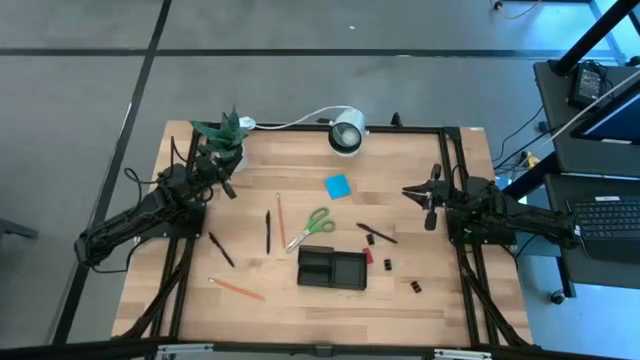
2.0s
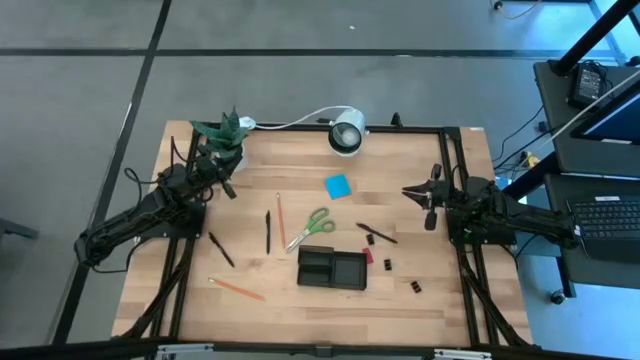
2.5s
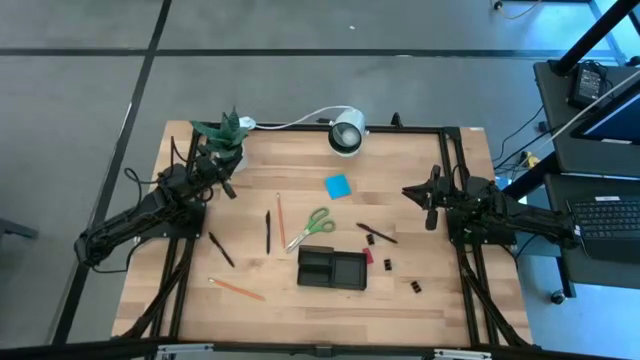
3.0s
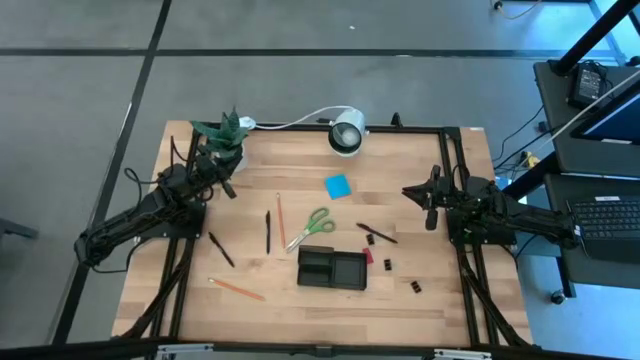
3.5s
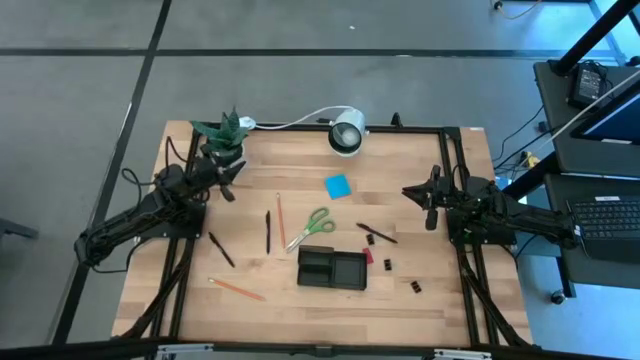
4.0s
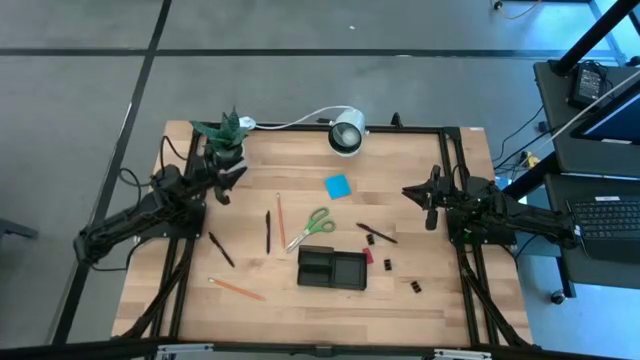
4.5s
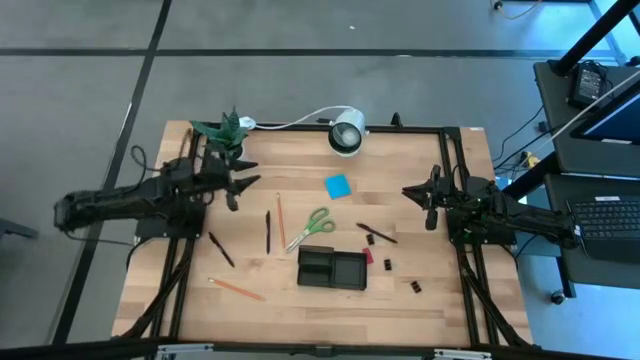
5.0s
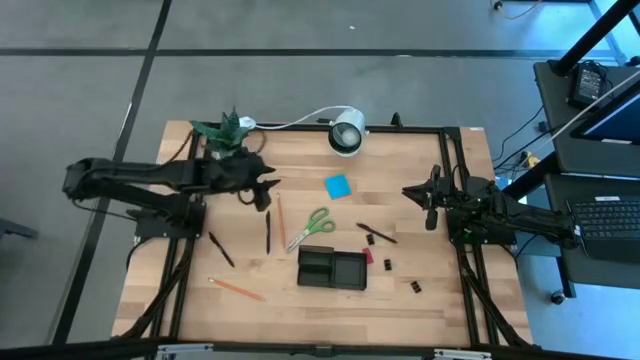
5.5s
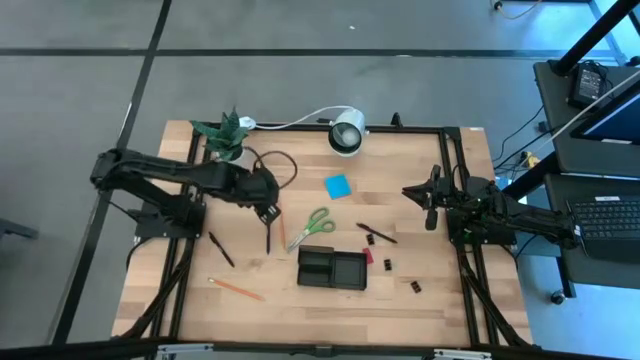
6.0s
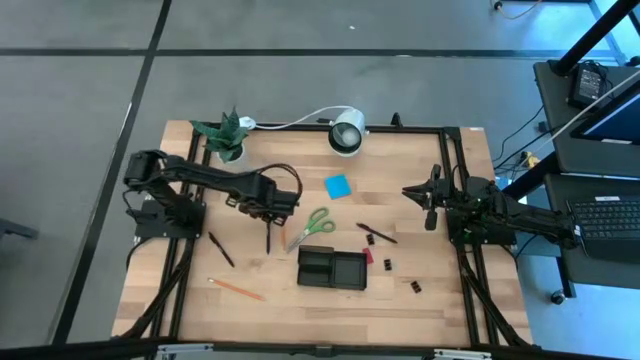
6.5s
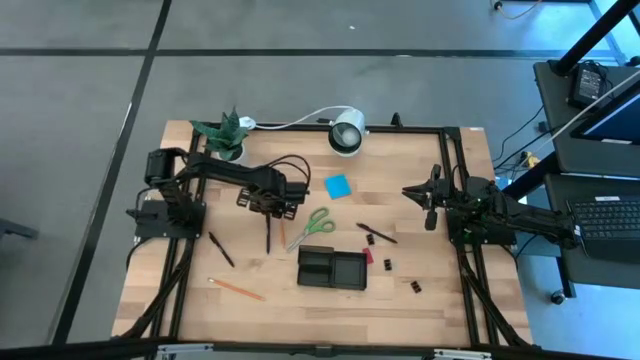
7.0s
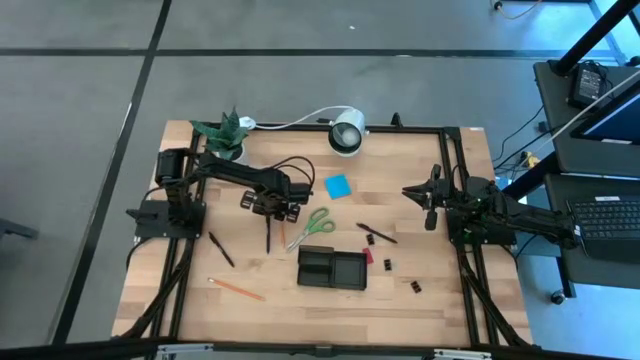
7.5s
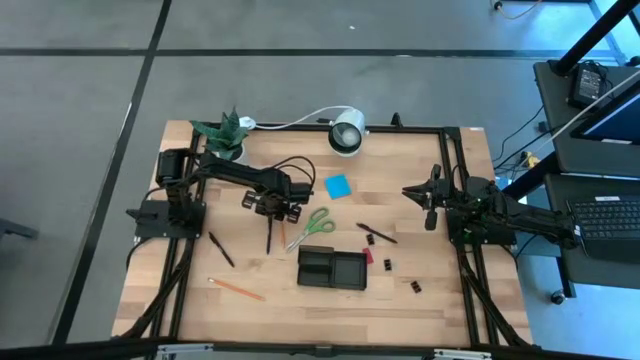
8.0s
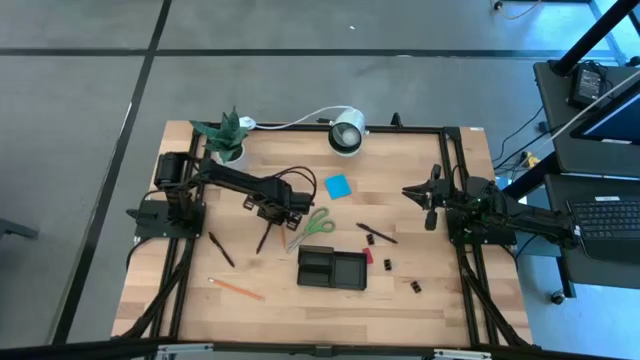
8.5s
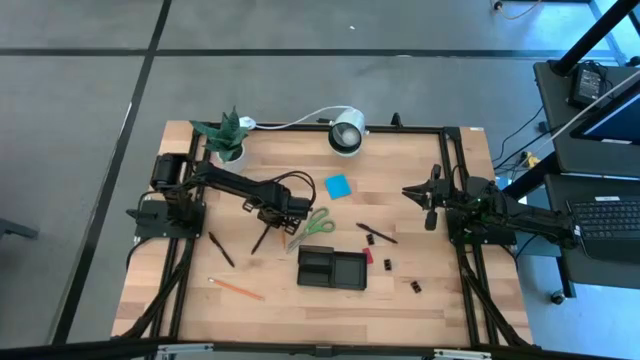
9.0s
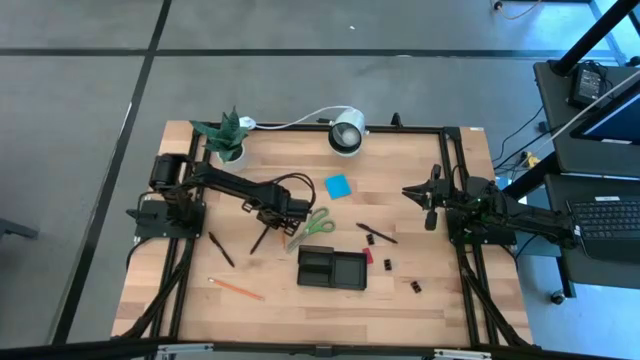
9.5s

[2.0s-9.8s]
Task: Pick and place office supplies into organizer
Put the middle black pen into the desk organizer

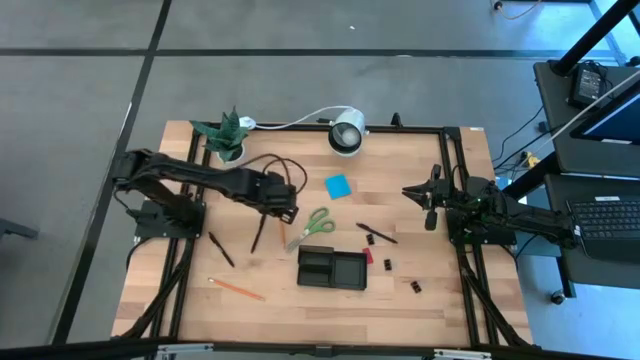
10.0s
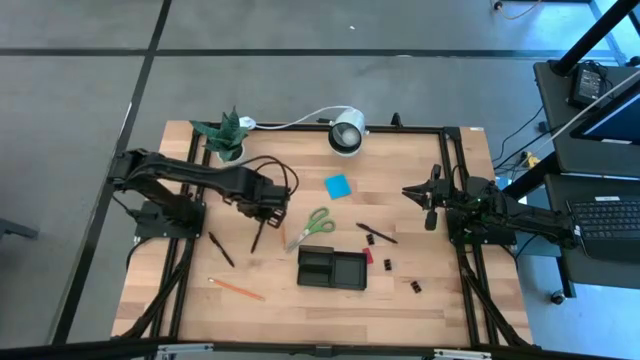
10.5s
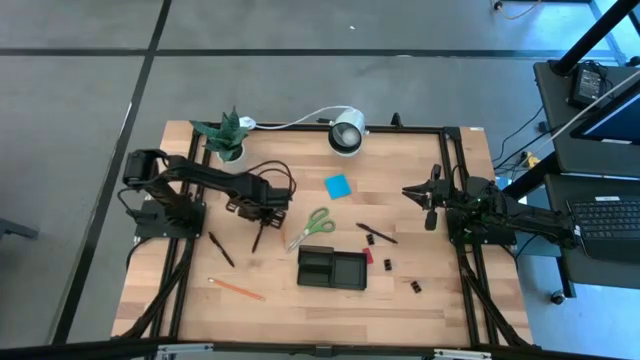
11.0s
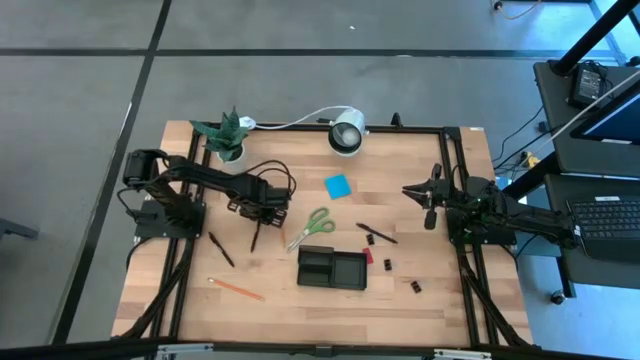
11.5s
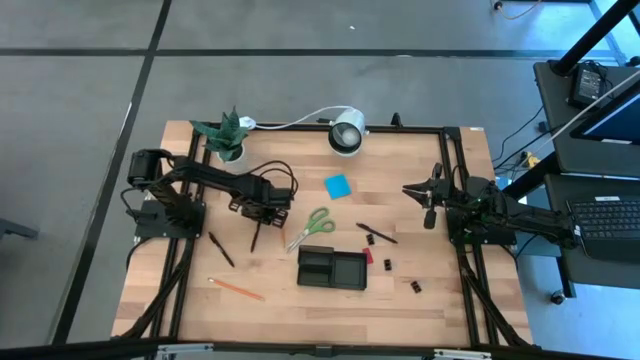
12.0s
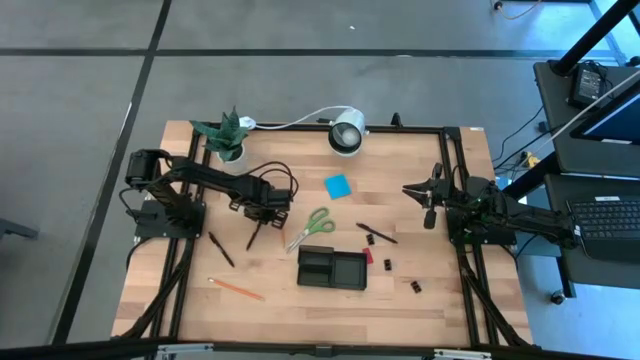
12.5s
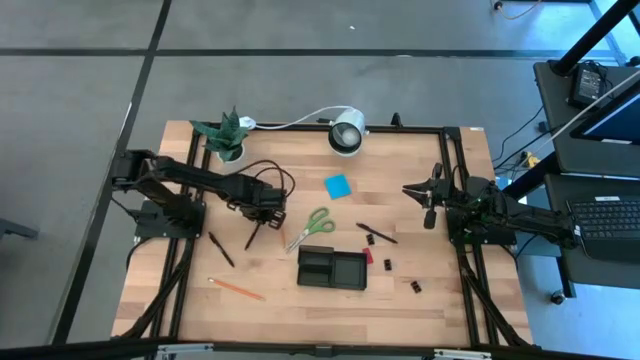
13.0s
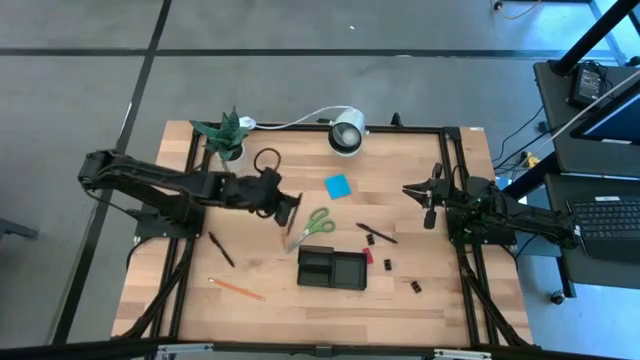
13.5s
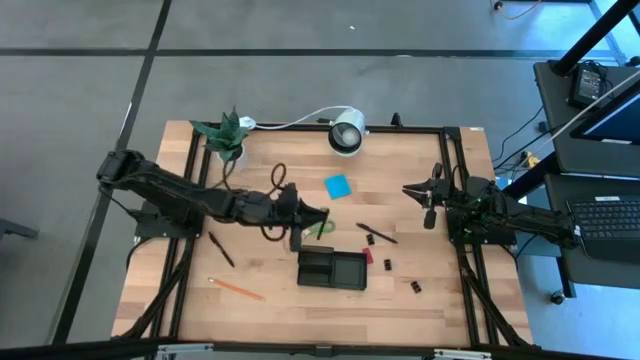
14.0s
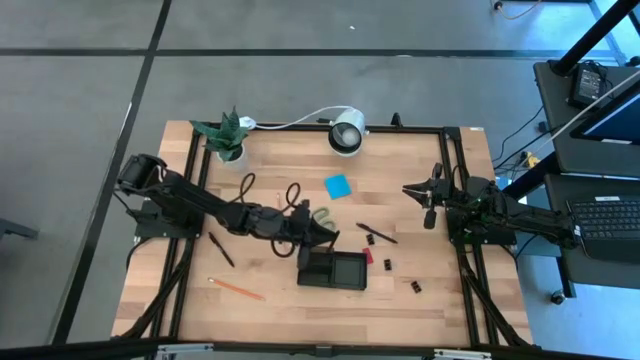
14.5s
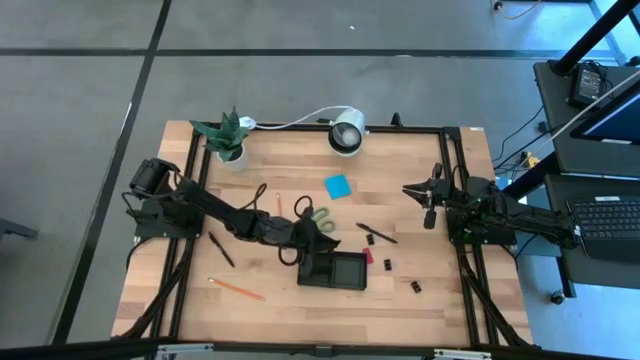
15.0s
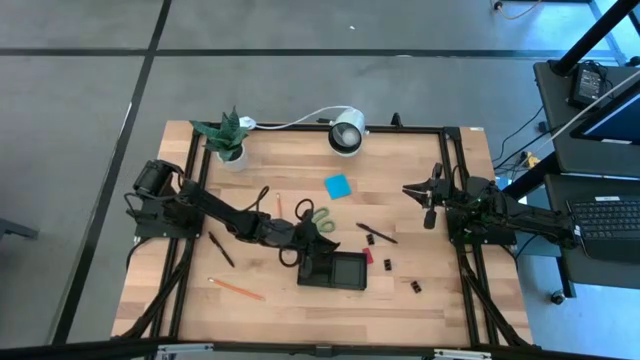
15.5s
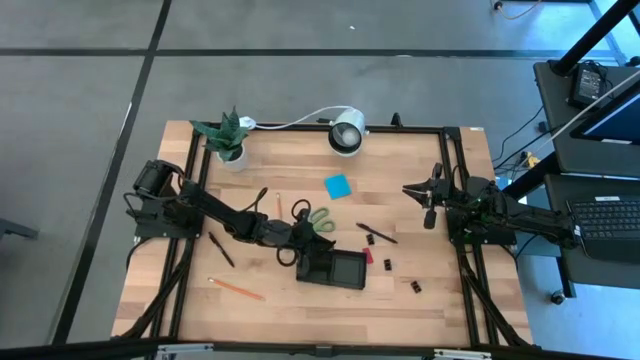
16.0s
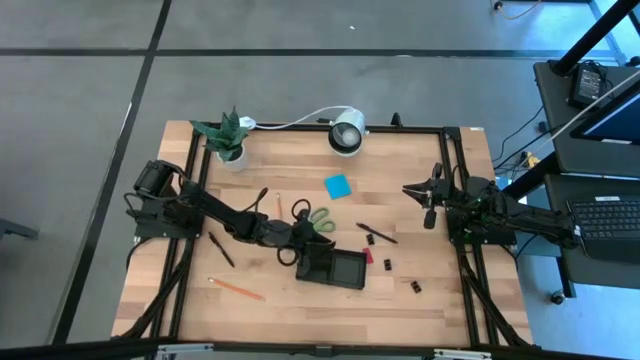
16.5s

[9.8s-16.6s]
Put the middle black pen into the desk organizer

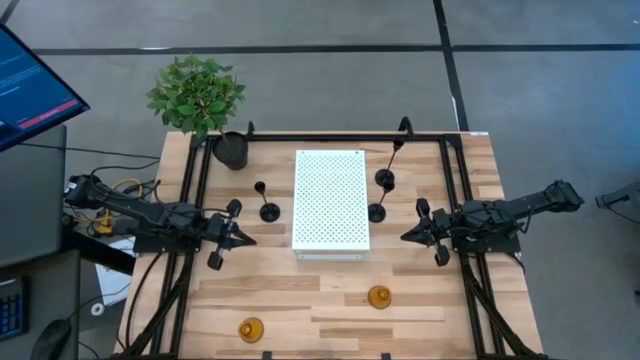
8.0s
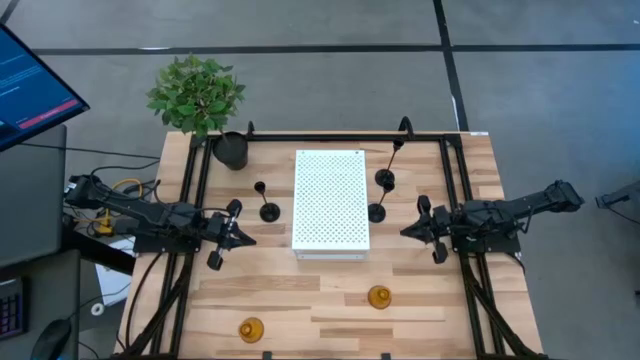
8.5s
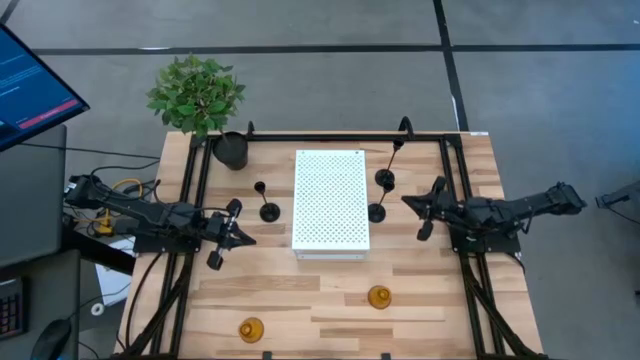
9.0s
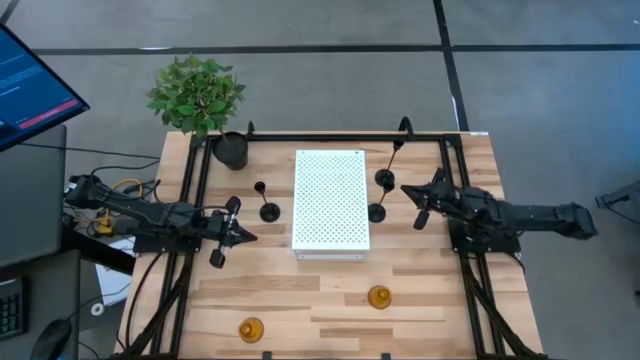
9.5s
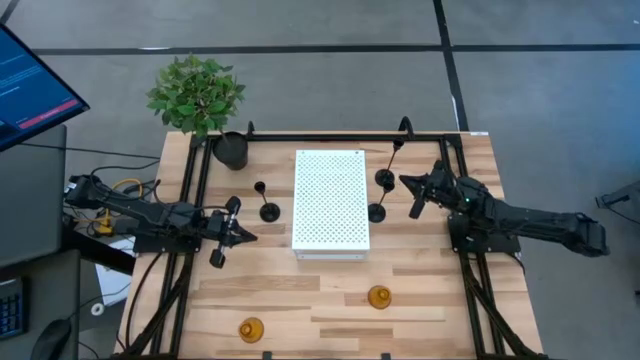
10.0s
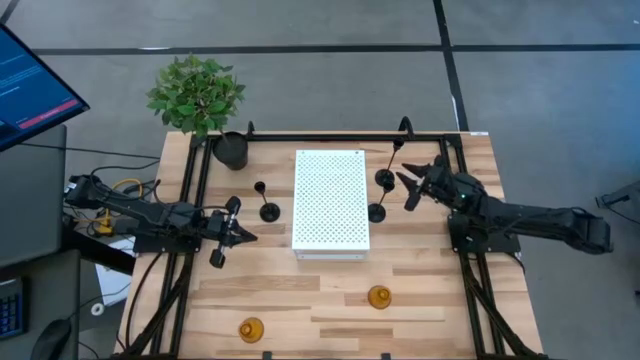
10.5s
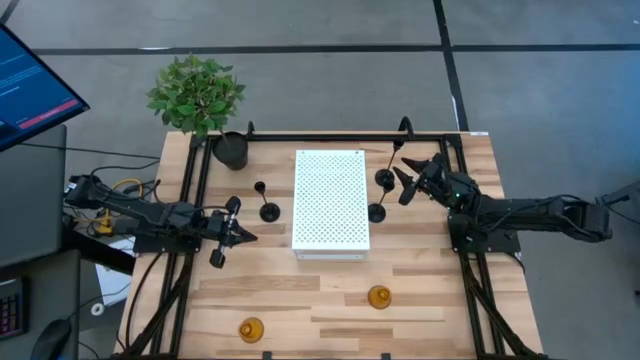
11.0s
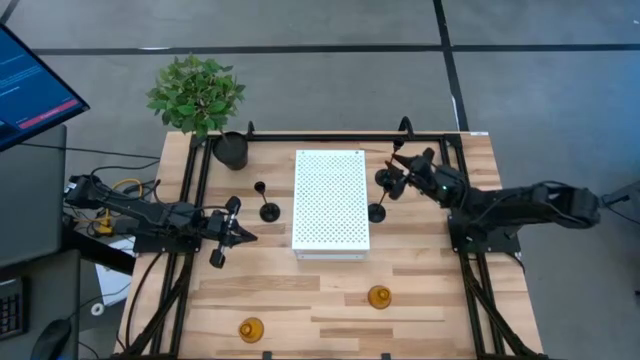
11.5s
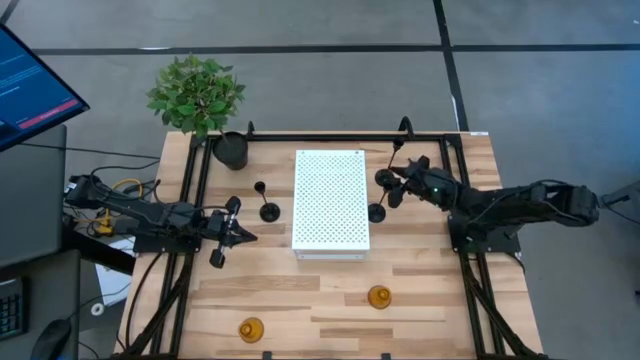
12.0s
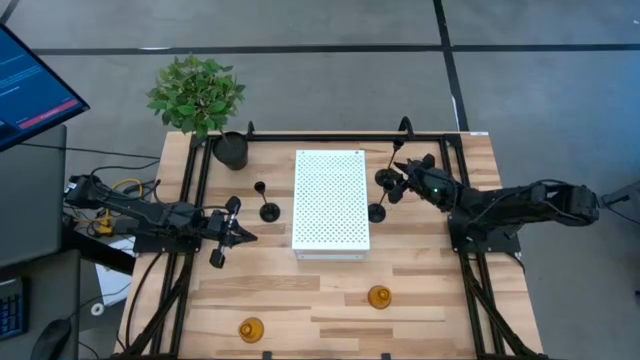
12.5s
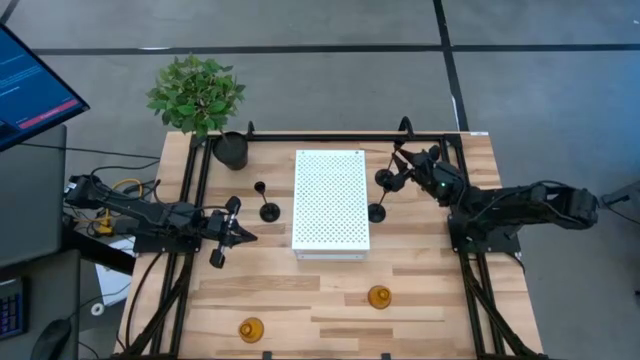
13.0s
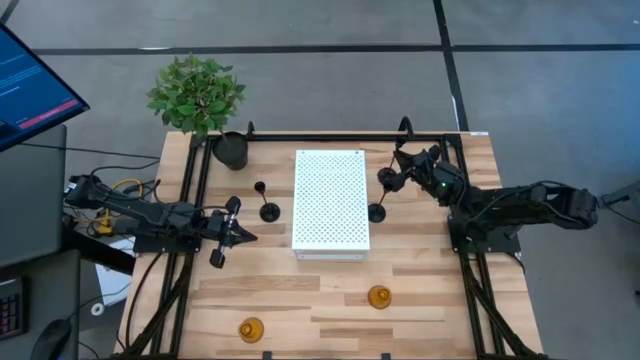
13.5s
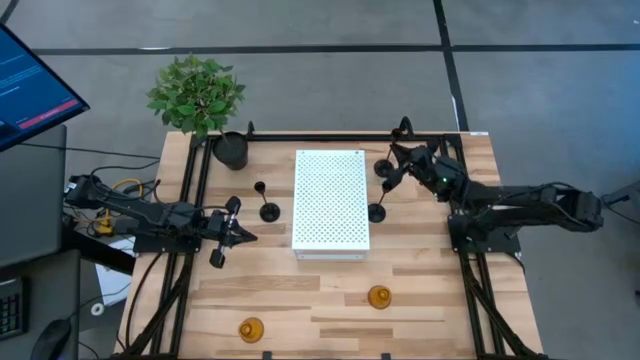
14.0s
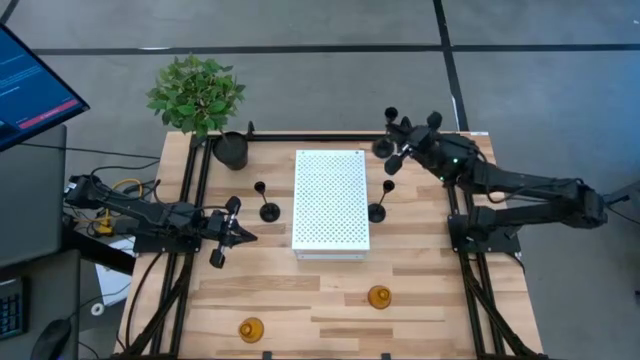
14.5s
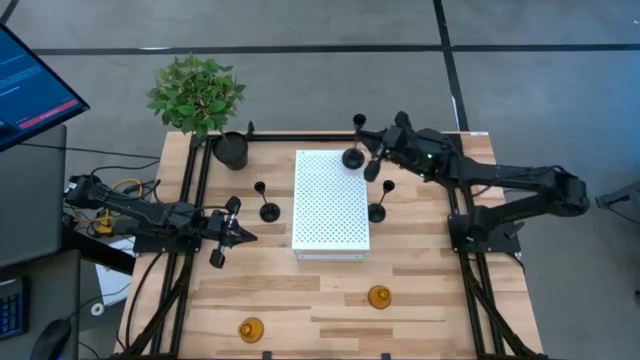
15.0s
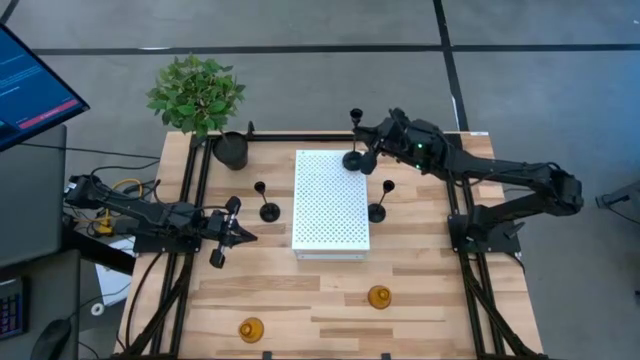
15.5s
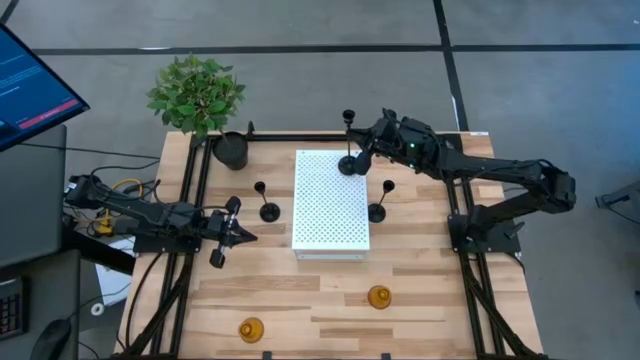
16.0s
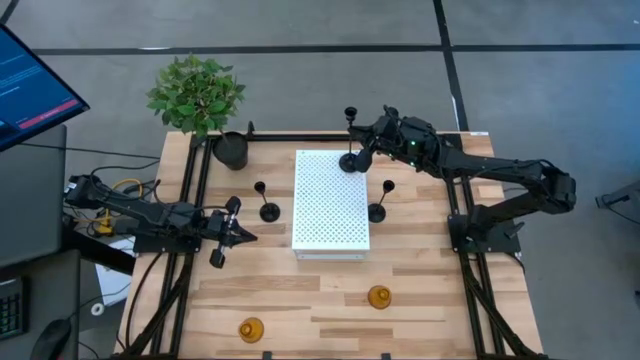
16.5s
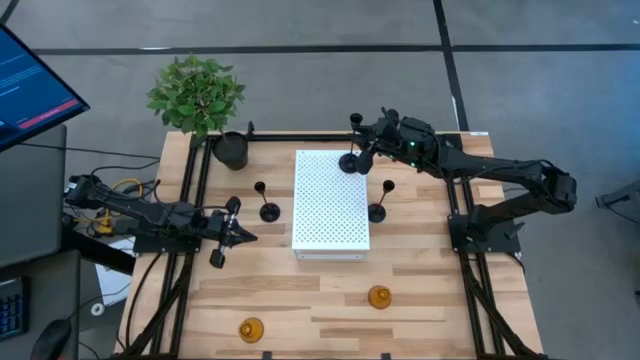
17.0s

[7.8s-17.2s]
Task: Pick & Place candle stick holders
Put the top black candle holder on the shelf
